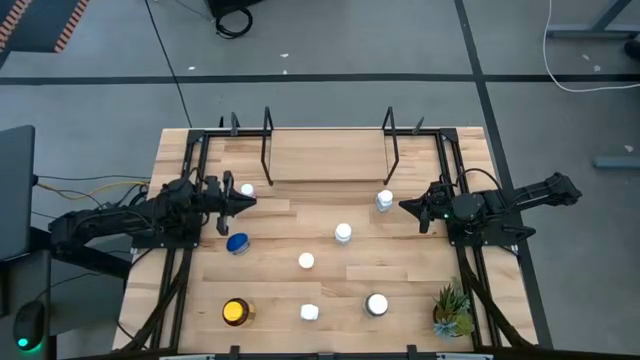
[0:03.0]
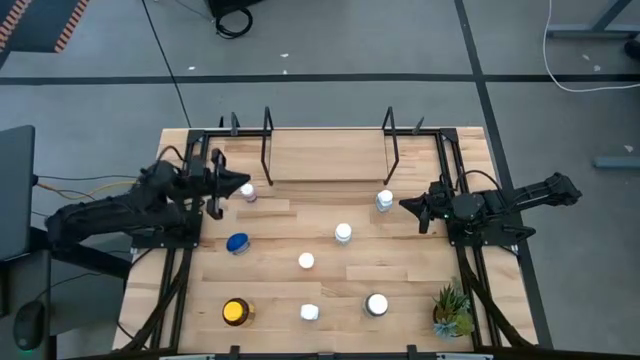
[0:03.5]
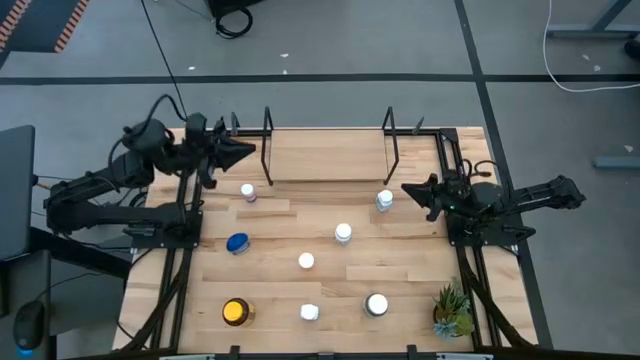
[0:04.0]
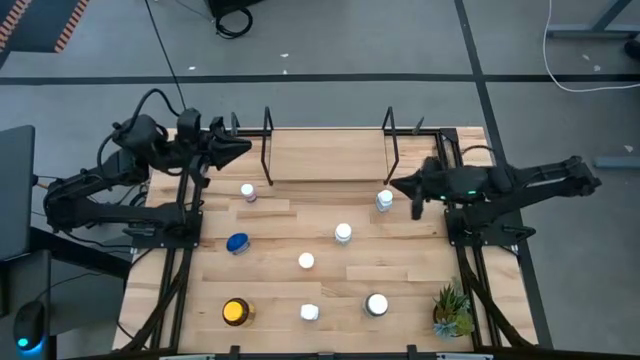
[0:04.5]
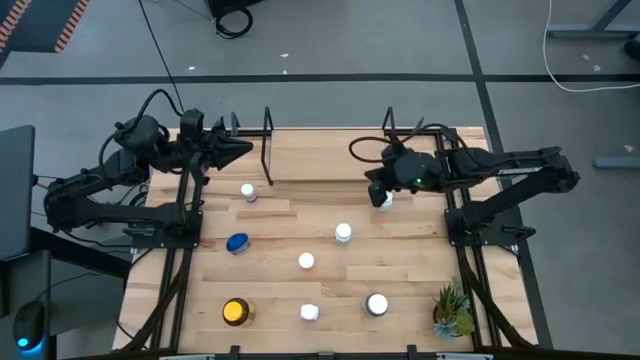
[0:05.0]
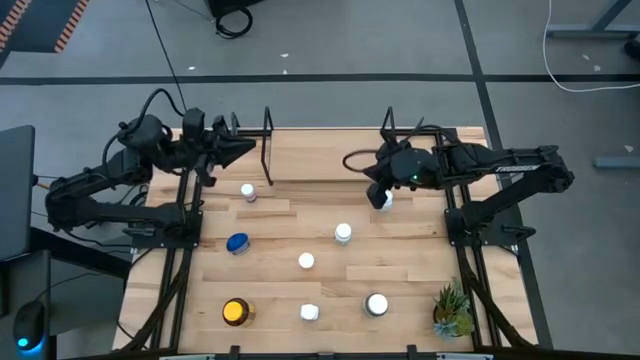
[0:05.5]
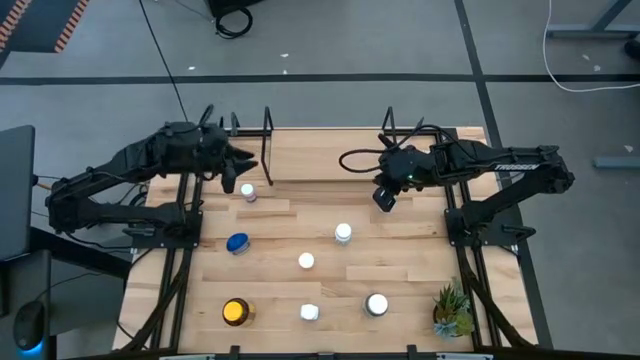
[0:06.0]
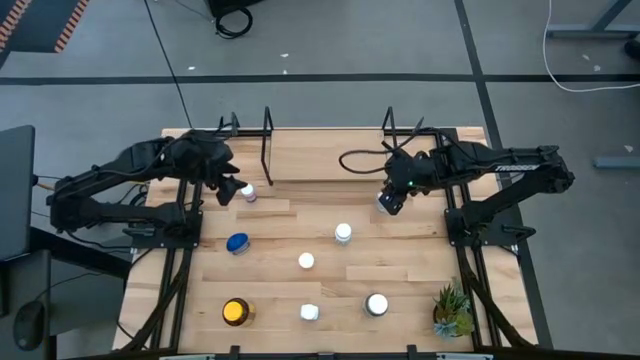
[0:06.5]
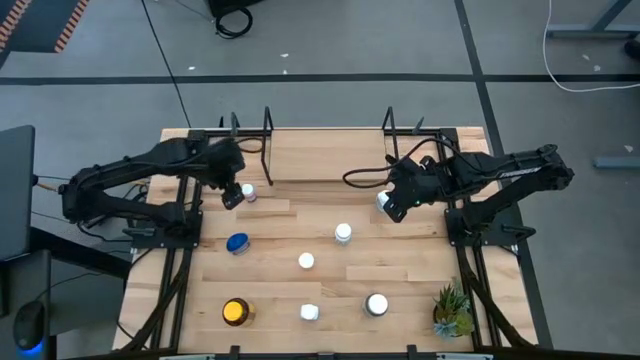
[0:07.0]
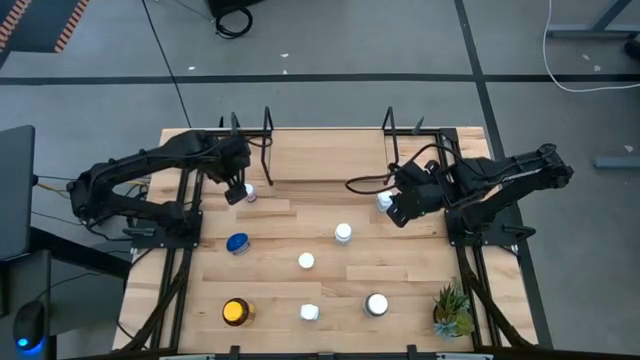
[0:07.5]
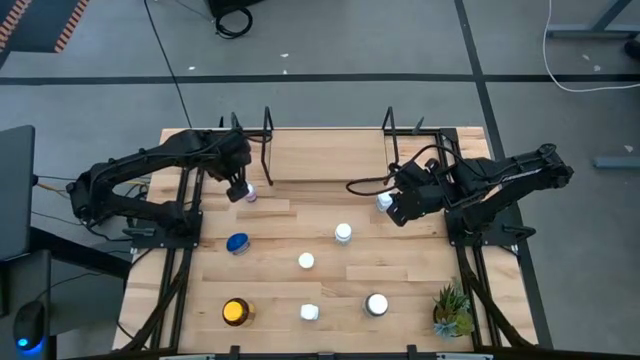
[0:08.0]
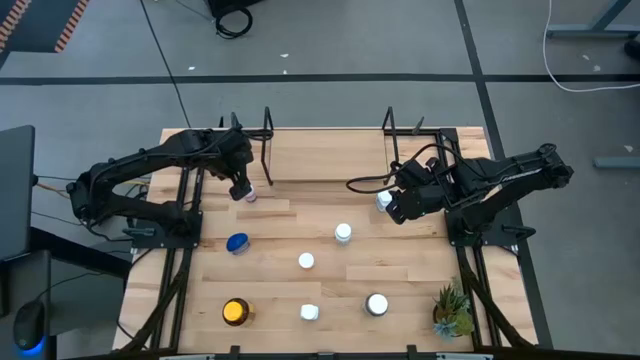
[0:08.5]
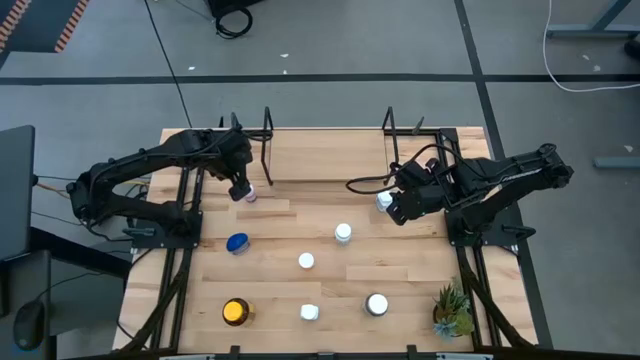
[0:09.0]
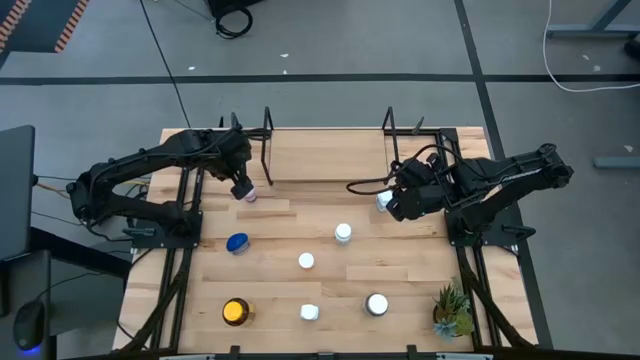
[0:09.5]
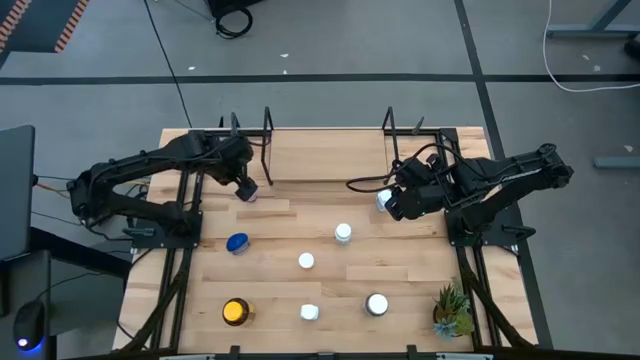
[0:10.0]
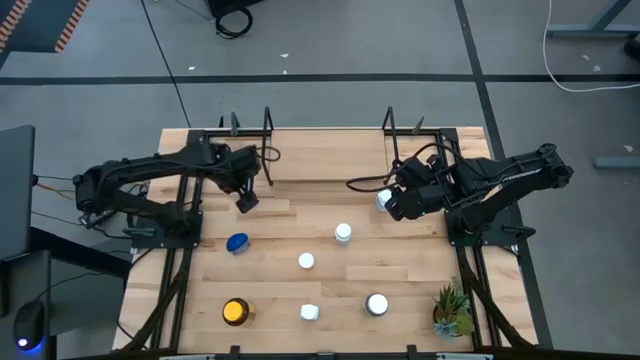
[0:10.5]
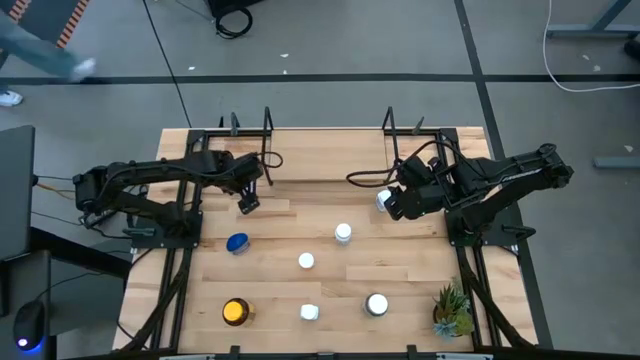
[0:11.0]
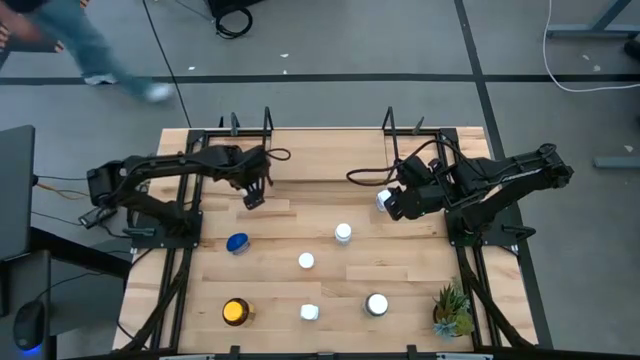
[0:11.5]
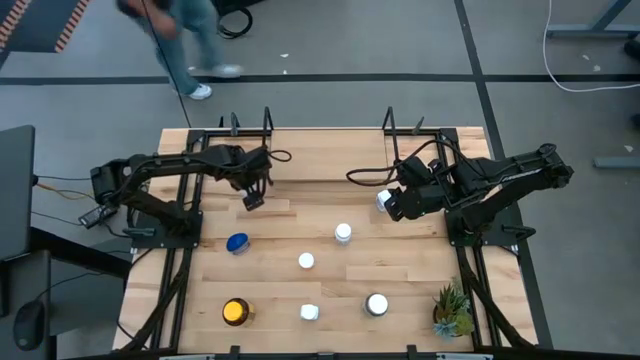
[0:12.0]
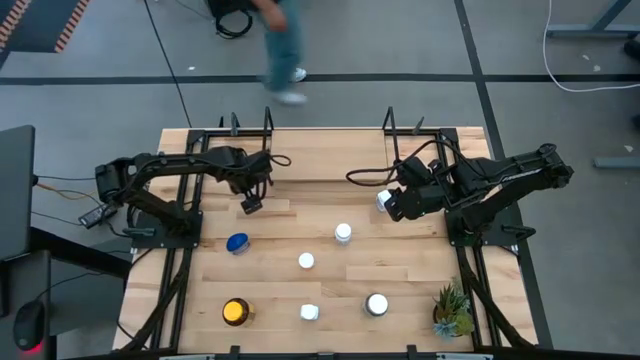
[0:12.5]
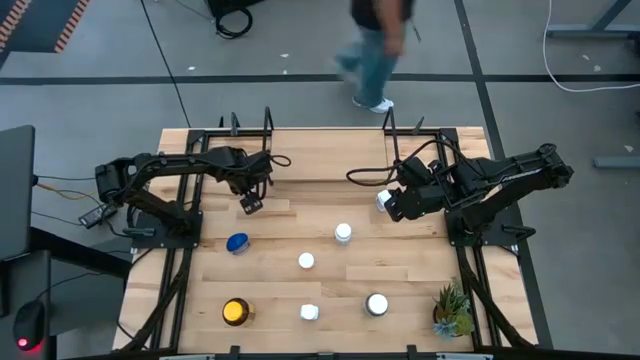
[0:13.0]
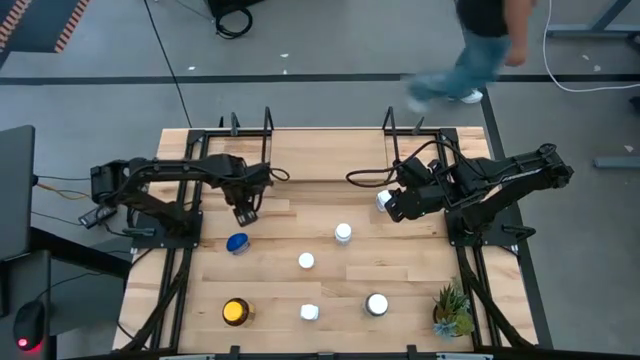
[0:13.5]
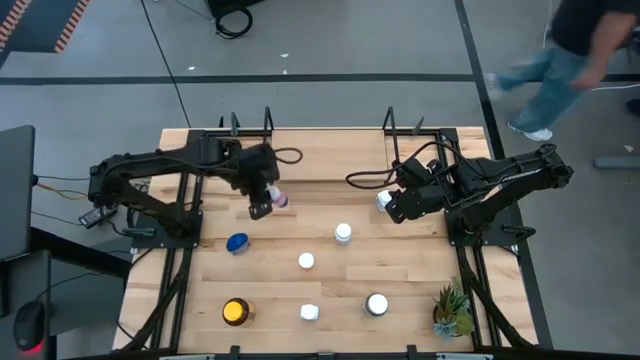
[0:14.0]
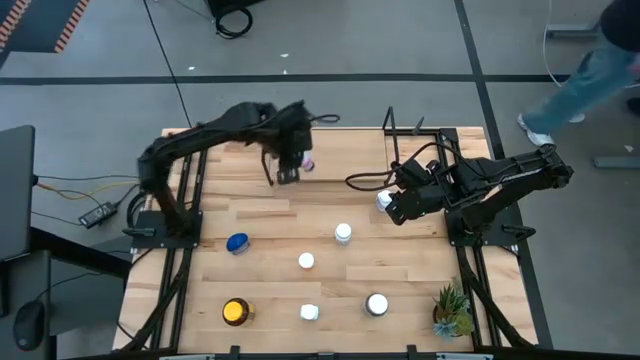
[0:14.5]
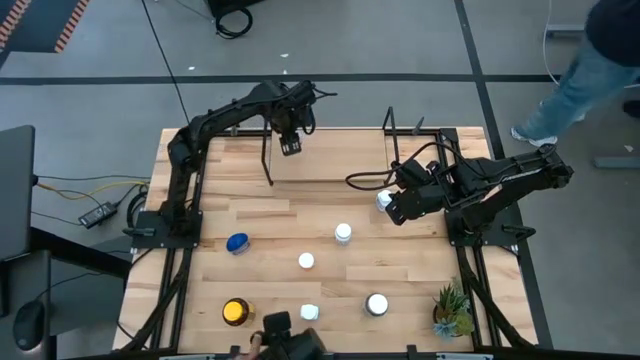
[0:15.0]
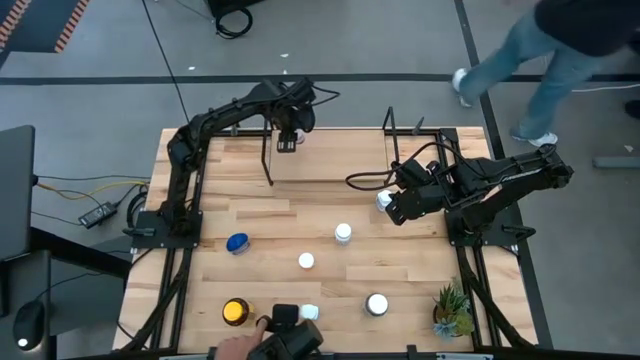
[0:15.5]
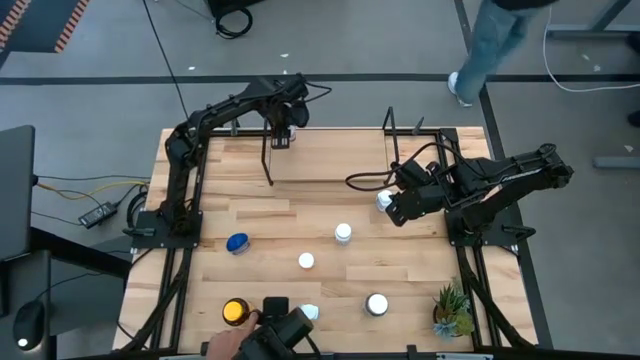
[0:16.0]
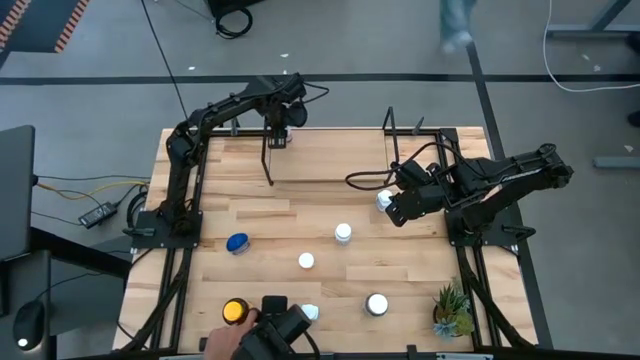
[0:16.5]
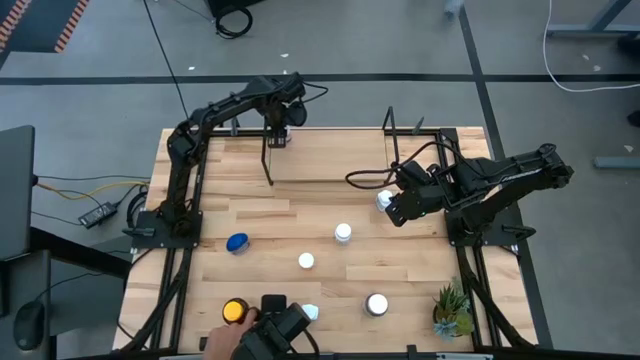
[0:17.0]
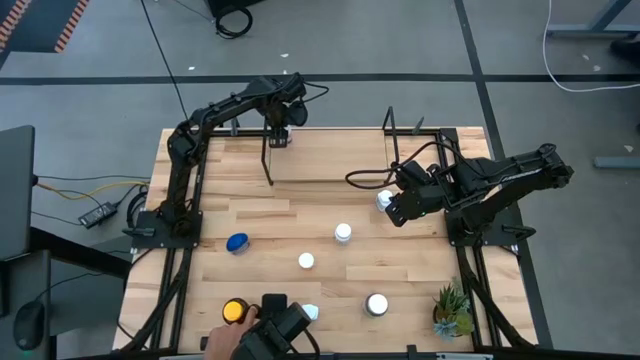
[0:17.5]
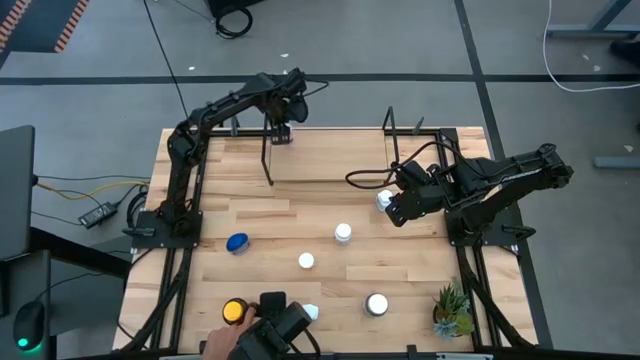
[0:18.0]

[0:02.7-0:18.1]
Task: Pick and place medicine bottles onto shelf by color
Put the pink pill bottle on the shelf

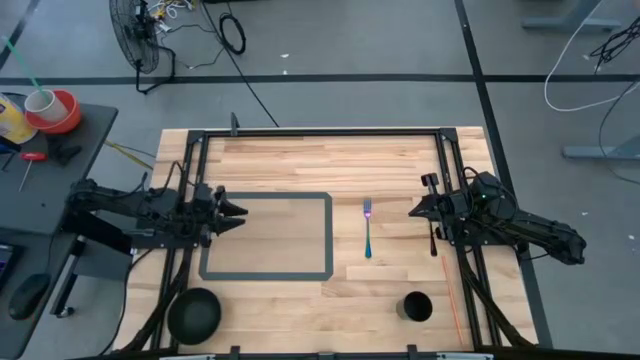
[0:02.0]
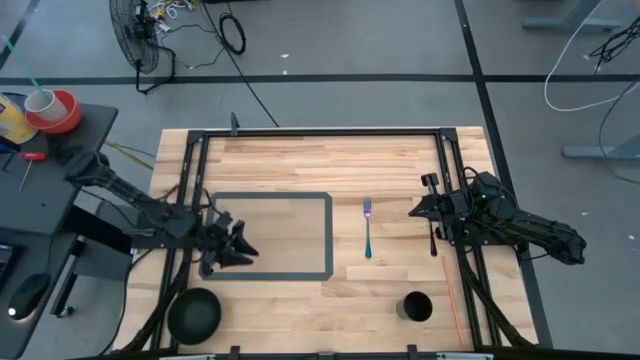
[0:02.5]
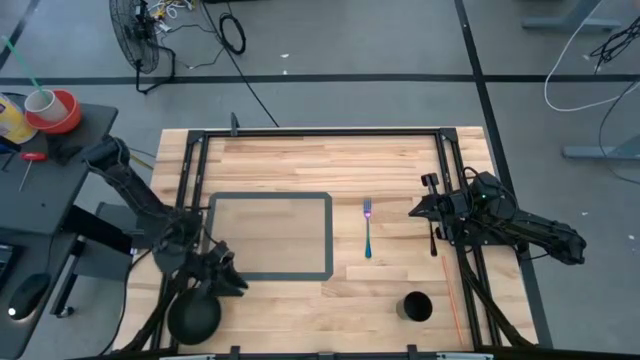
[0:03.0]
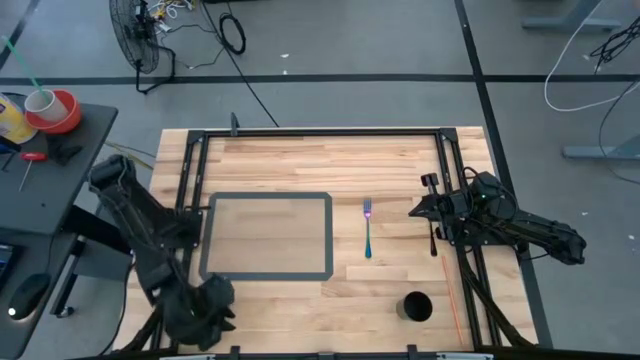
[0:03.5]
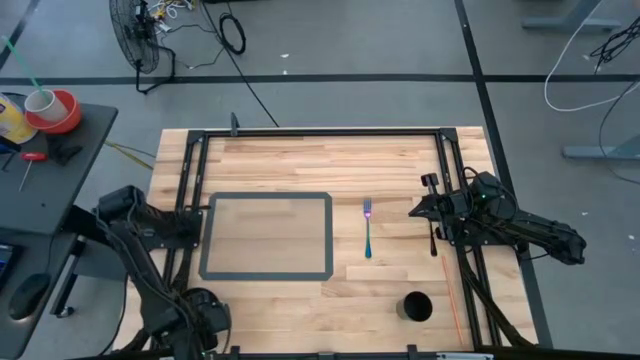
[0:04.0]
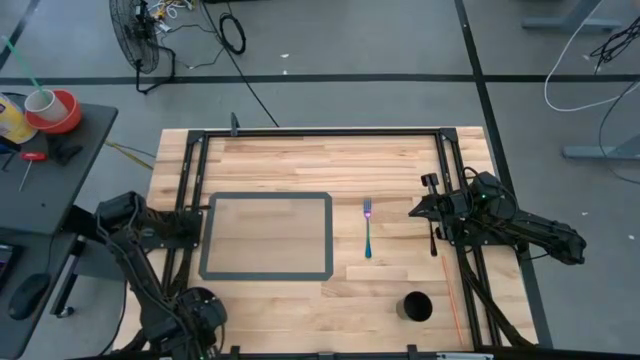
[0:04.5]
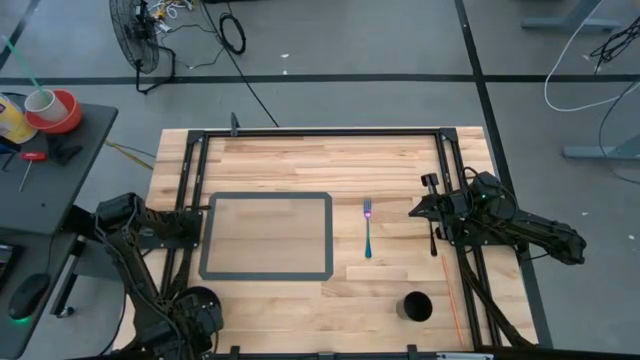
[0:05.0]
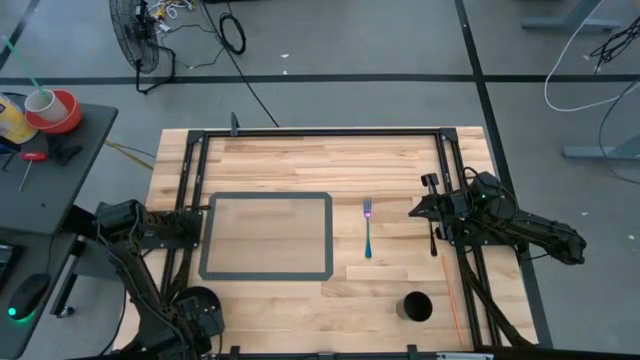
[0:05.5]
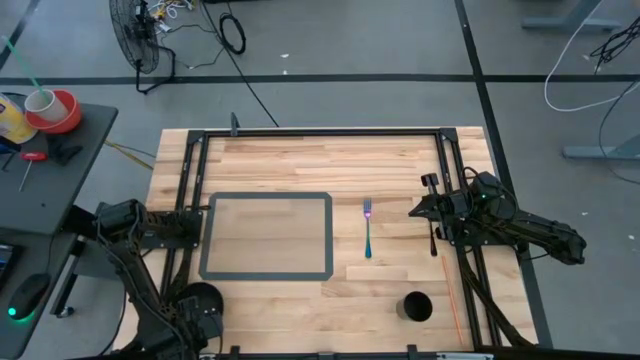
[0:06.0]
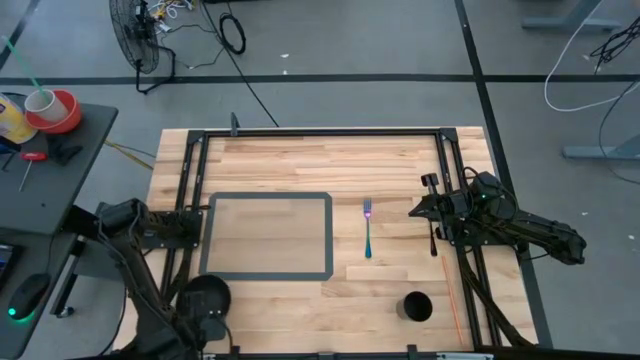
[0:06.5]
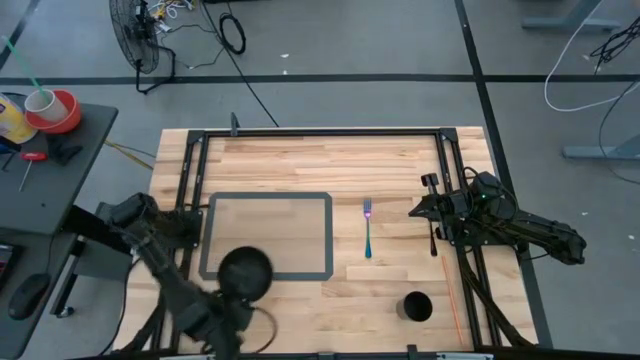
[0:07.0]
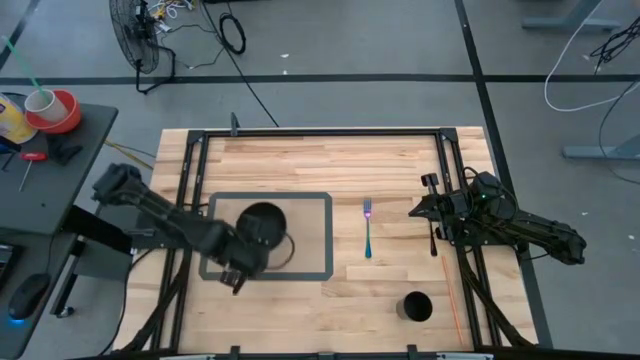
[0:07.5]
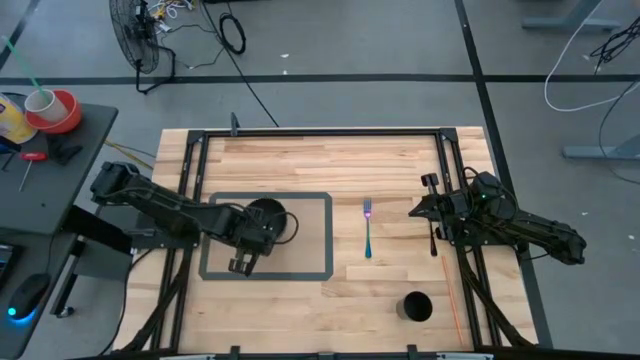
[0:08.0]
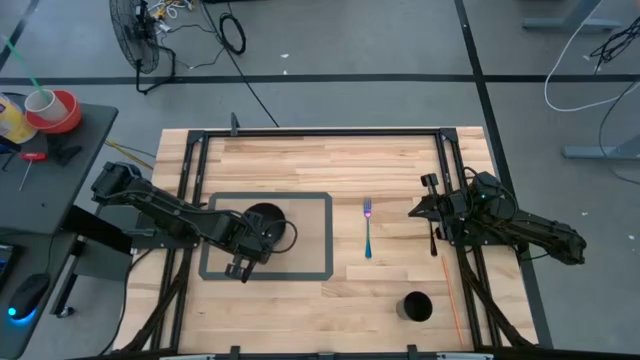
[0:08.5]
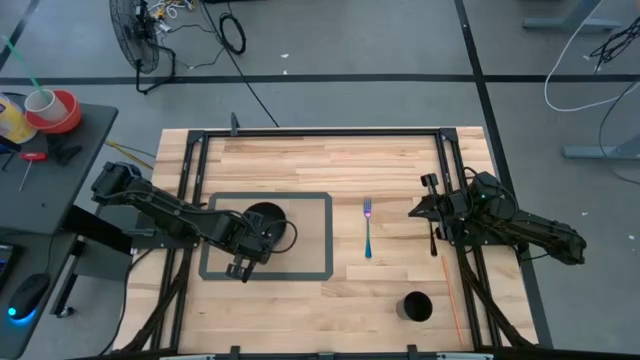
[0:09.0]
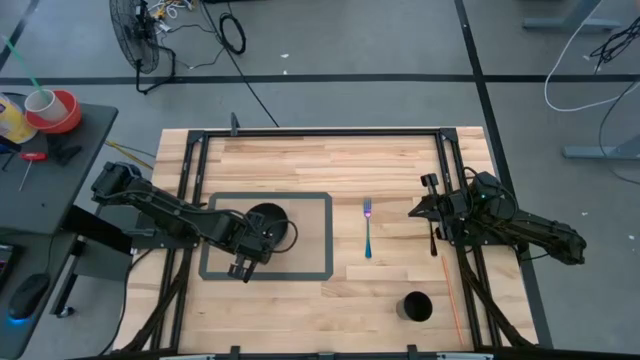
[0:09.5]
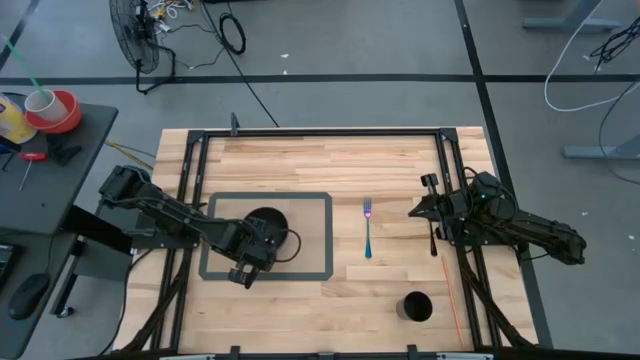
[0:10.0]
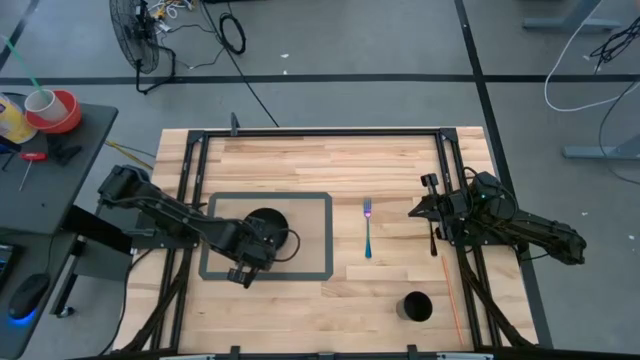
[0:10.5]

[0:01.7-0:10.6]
Task: Pick & Place Utensil
Put the black bowl on the table mat
